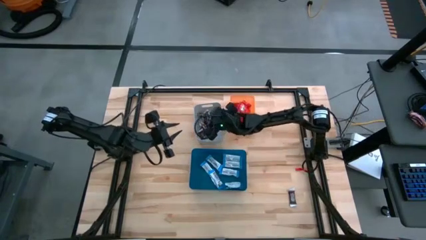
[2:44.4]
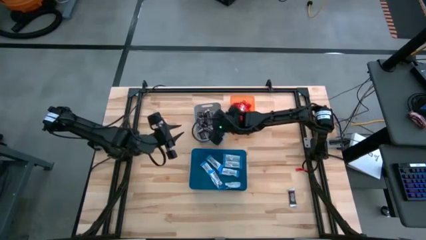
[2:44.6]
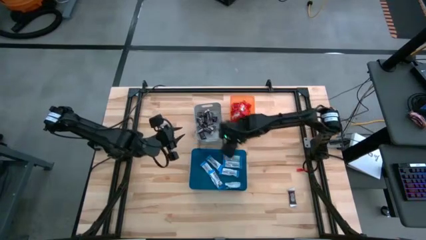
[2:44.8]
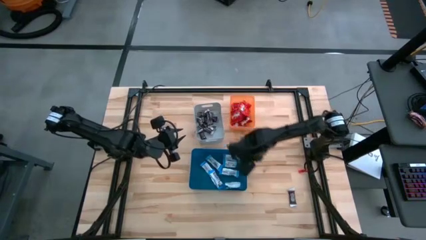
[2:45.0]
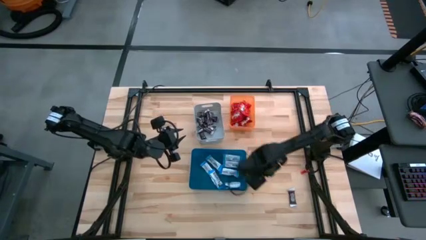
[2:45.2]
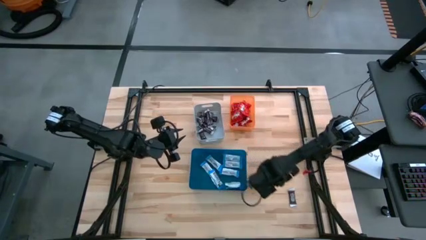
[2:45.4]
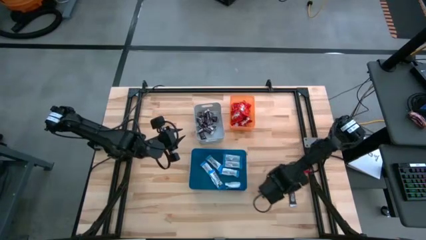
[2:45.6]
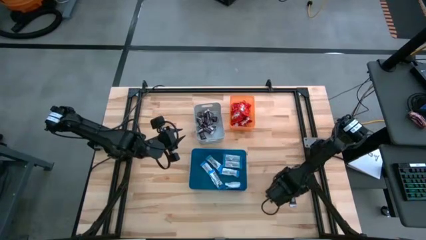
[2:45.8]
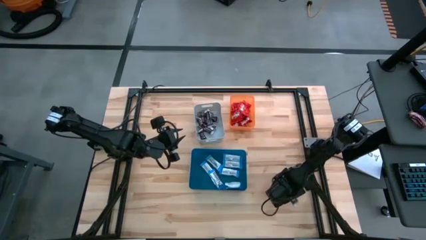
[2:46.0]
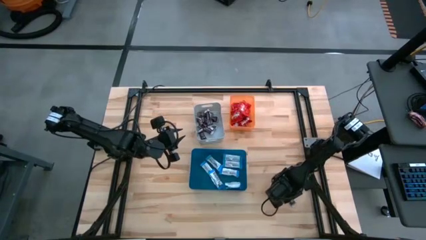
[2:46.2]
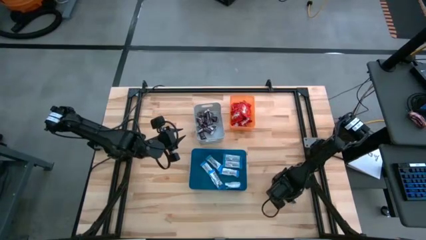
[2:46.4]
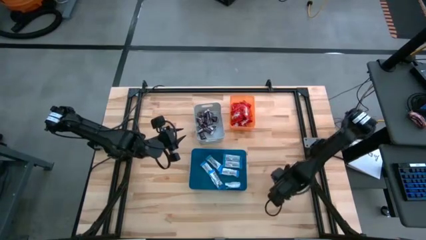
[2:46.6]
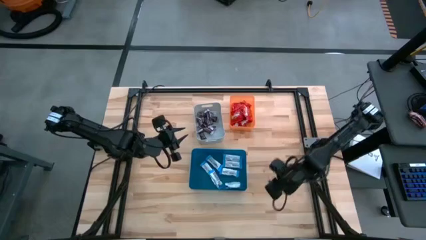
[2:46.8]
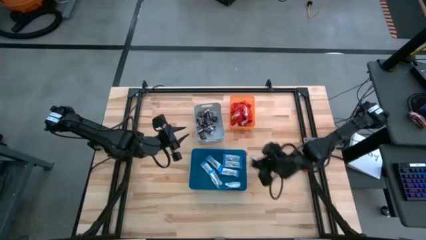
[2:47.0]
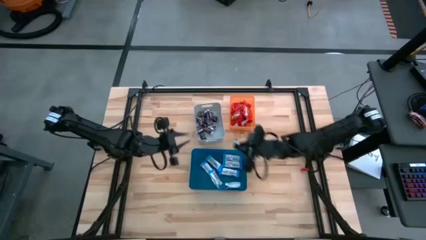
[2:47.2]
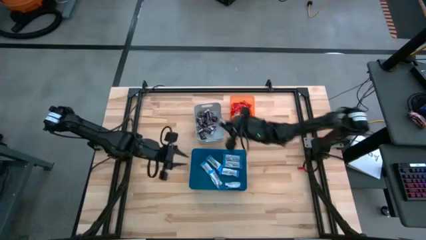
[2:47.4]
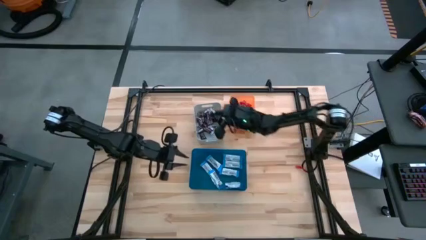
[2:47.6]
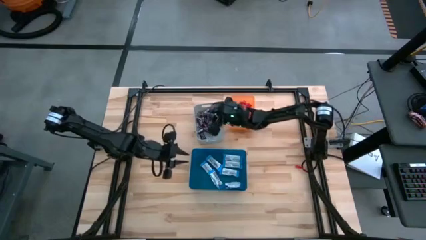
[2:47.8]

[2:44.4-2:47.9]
Task: Sort candy
Put the brown chocolate bar into the gray bin

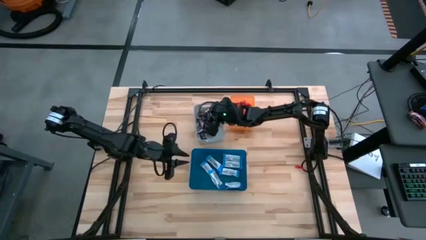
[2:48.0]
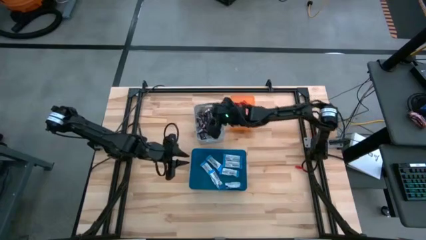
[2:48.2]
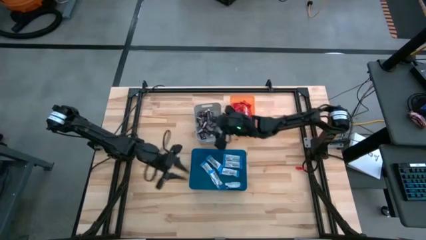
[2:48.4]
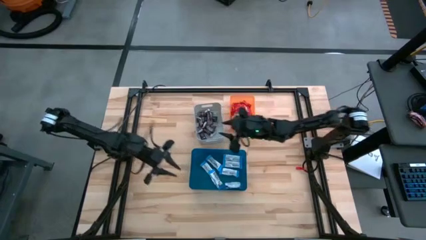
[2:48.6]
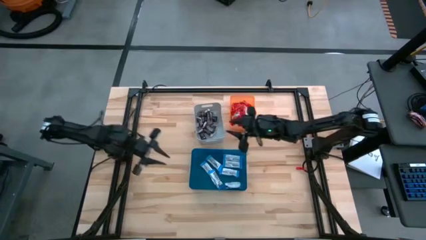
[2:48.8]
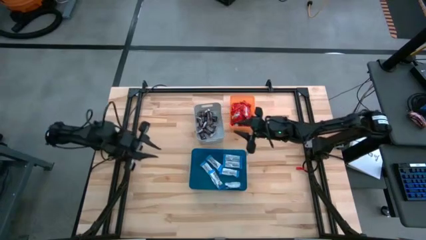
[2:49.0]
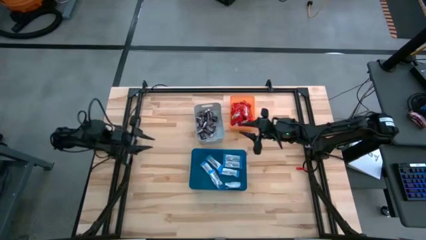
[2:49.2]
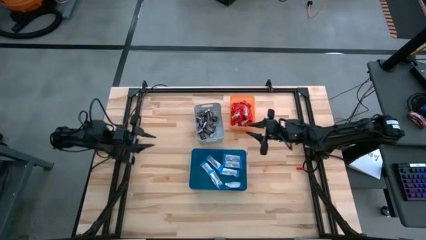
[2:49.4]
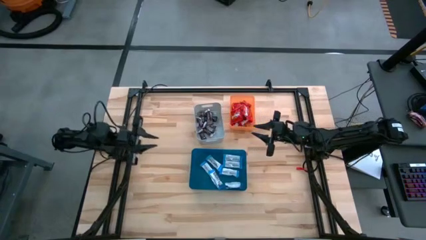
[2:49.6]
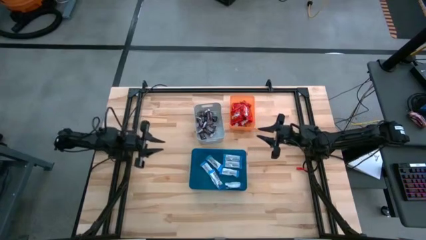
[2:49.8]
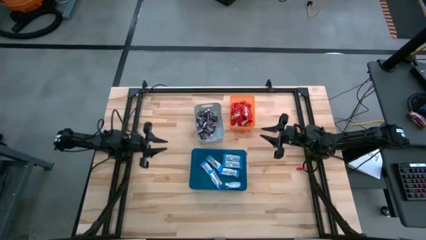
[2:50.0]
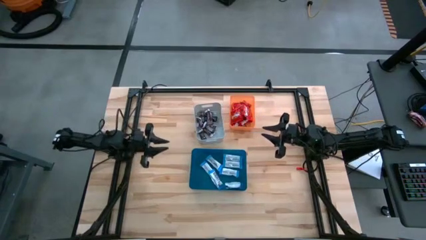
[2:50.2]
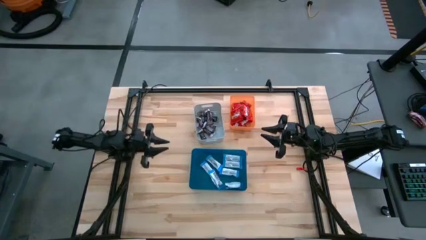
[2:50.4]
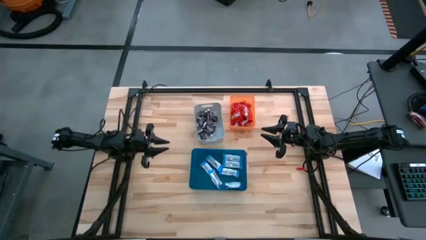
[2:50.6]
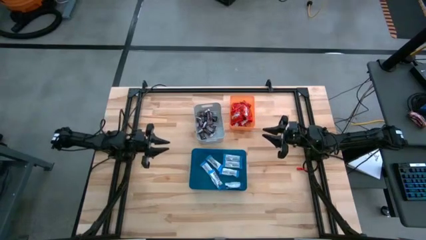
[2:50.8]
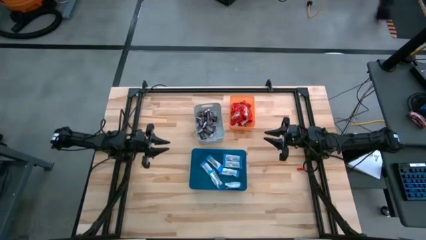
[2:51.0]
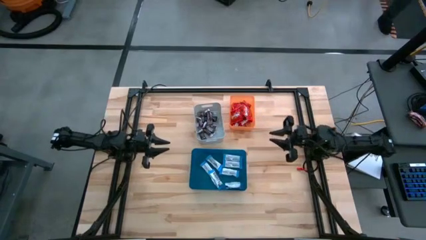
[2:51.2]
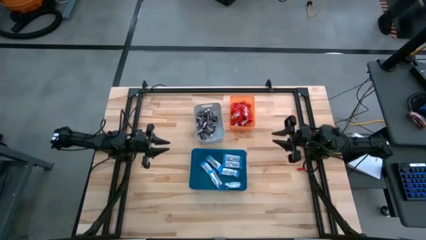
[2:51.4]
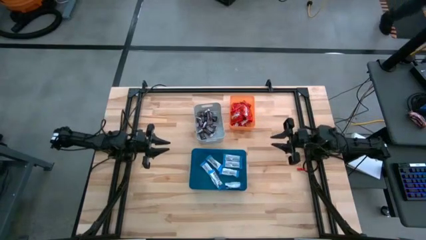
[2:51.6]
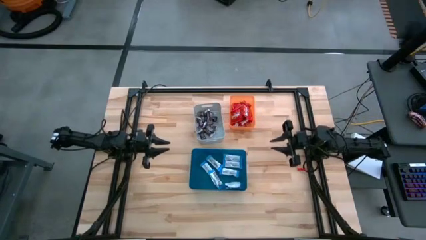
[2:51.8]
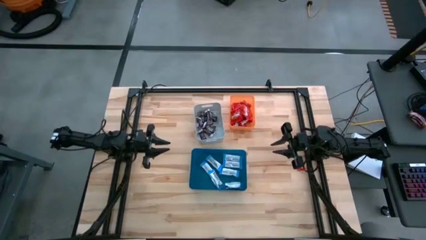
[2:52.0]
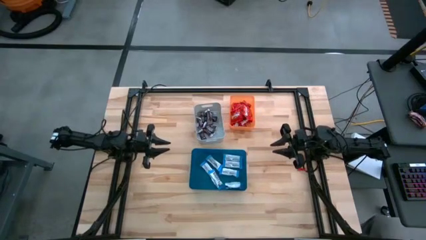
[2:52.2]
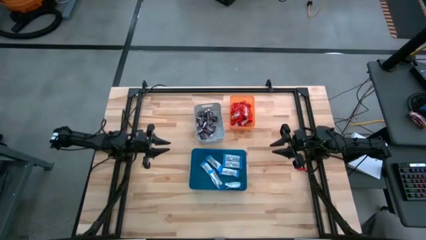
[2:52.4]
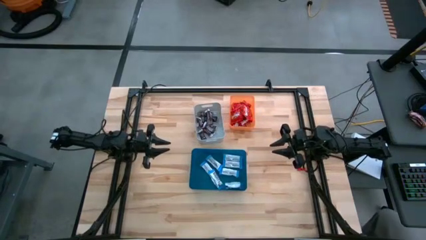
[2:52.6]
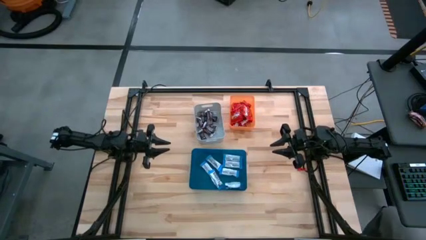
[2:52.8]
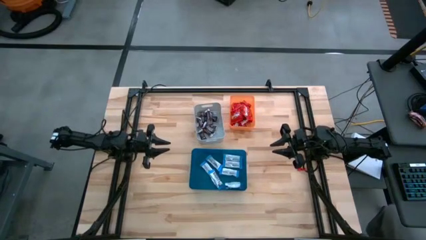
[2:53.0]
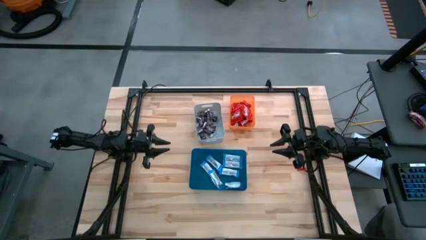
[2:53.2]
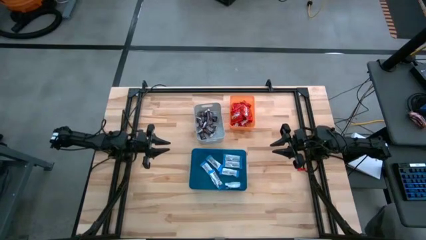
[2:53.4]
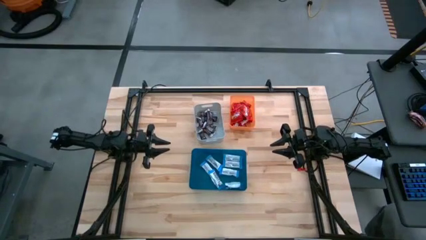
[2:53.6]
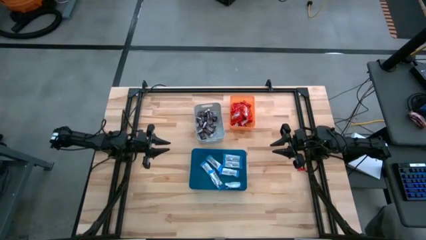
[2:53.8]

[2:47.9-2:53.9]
Return to Home Position

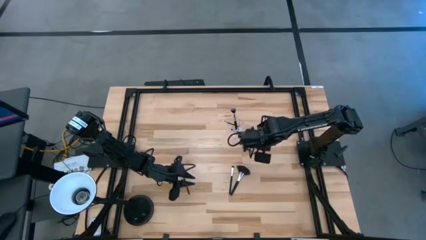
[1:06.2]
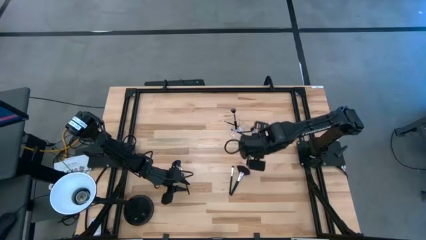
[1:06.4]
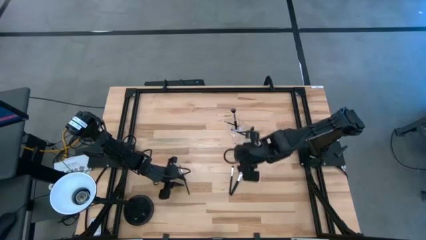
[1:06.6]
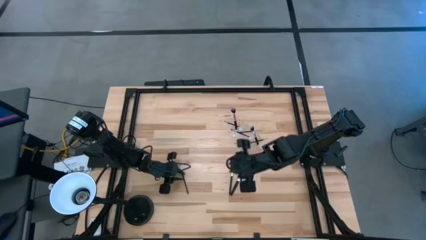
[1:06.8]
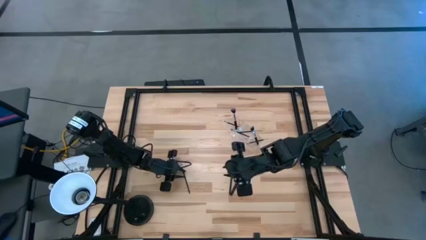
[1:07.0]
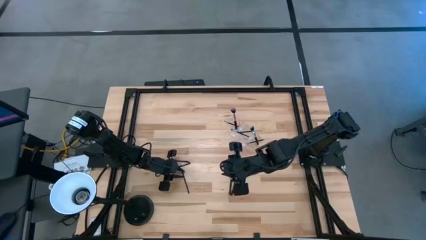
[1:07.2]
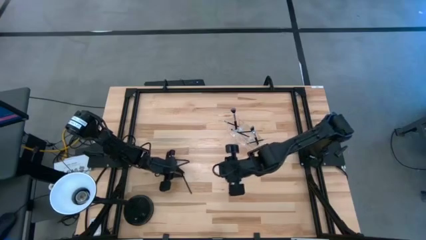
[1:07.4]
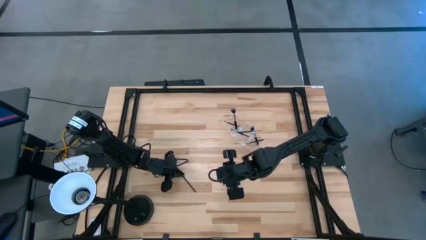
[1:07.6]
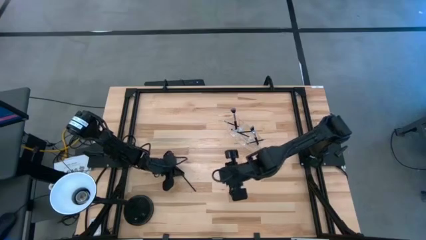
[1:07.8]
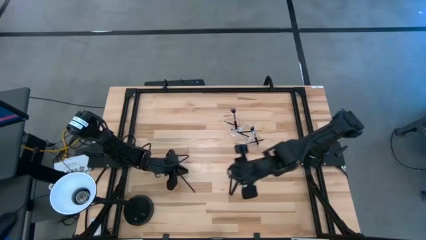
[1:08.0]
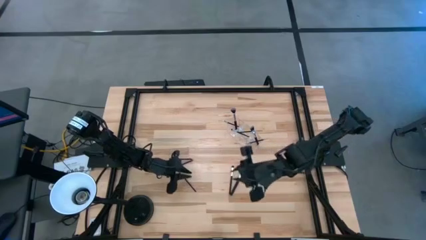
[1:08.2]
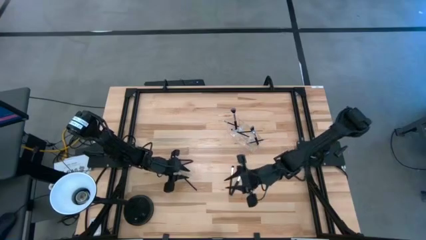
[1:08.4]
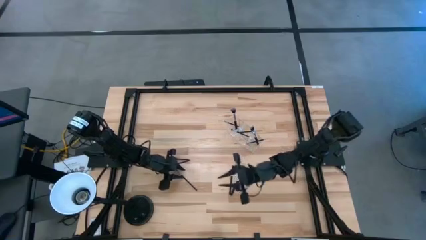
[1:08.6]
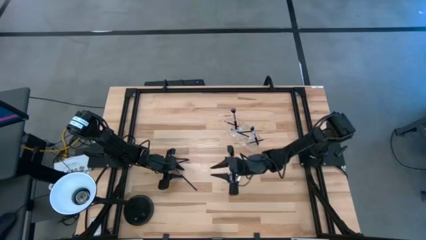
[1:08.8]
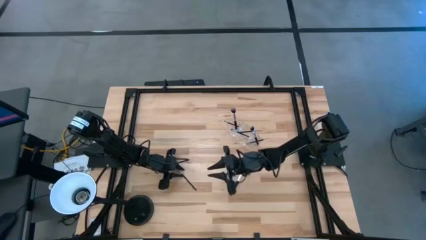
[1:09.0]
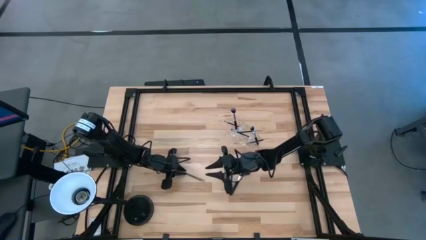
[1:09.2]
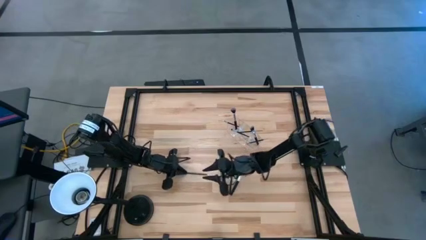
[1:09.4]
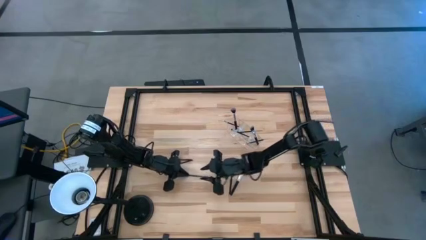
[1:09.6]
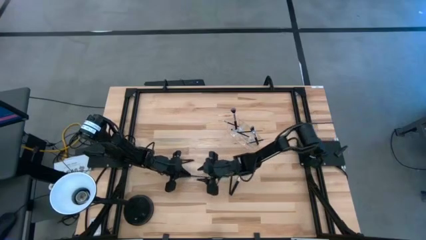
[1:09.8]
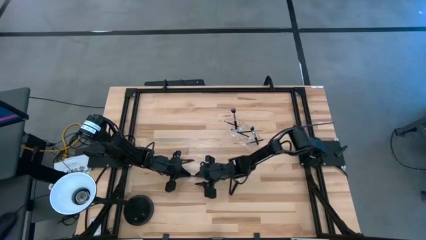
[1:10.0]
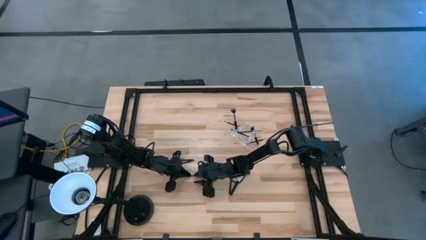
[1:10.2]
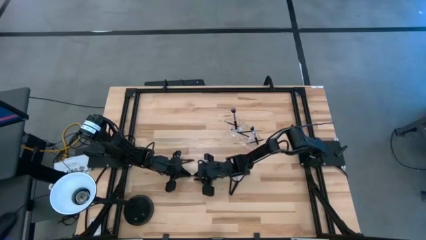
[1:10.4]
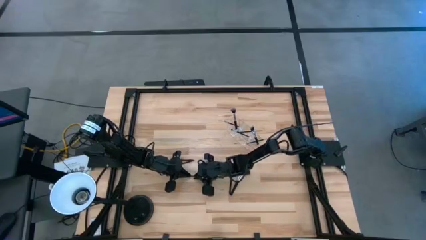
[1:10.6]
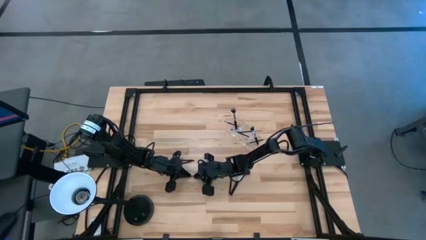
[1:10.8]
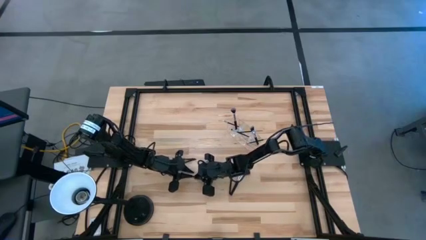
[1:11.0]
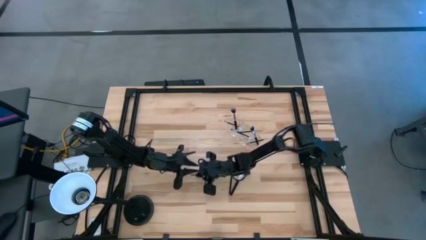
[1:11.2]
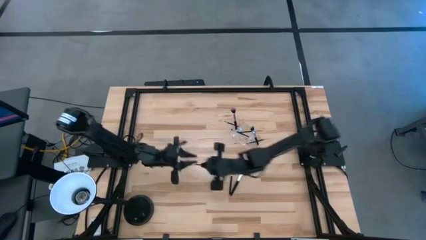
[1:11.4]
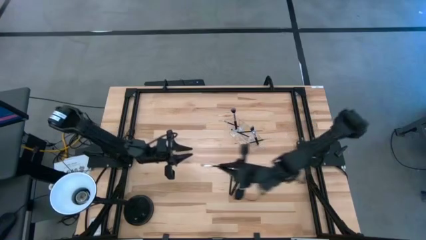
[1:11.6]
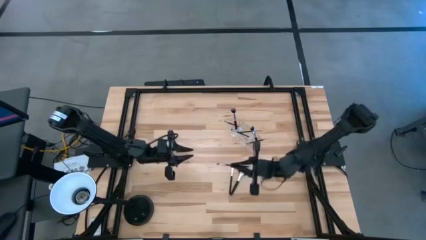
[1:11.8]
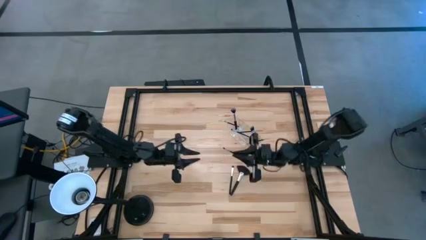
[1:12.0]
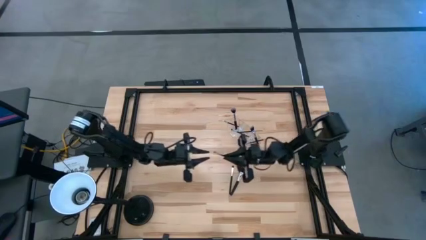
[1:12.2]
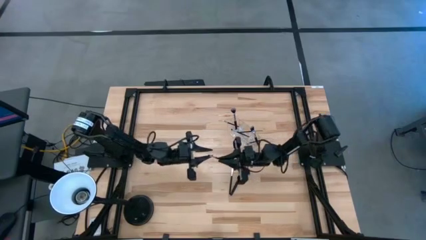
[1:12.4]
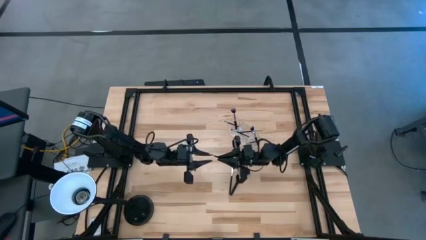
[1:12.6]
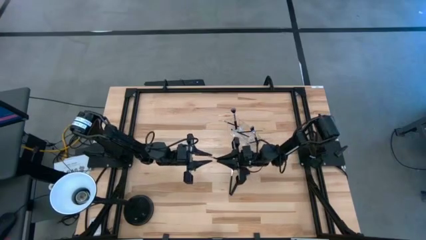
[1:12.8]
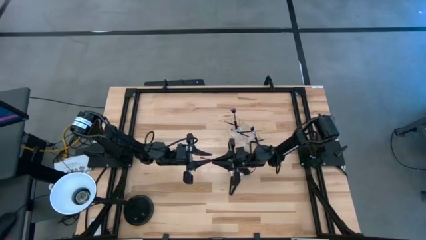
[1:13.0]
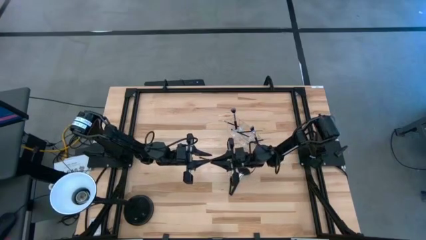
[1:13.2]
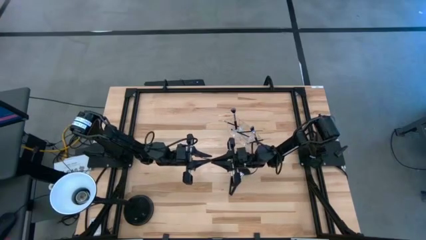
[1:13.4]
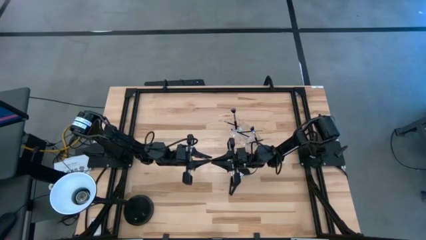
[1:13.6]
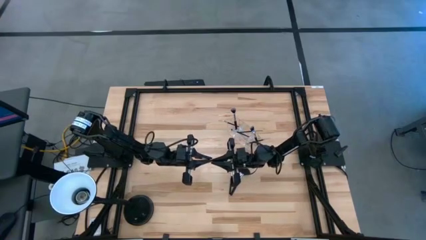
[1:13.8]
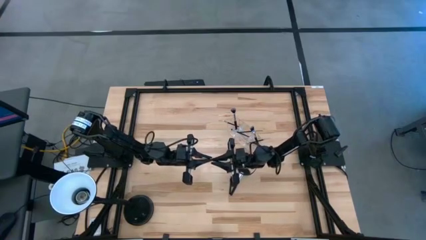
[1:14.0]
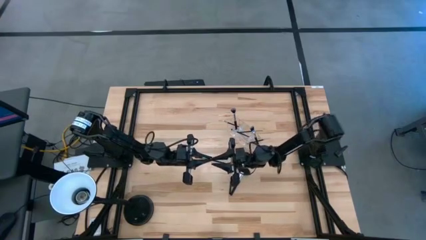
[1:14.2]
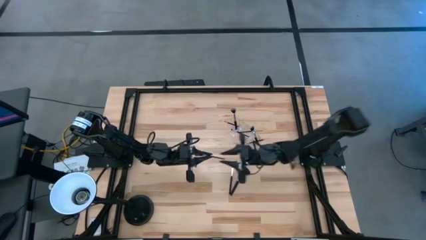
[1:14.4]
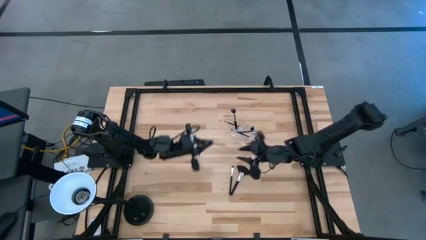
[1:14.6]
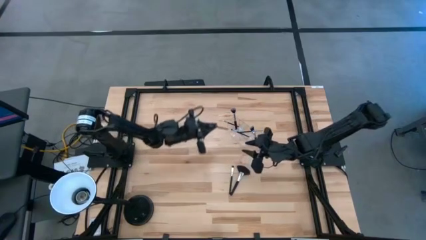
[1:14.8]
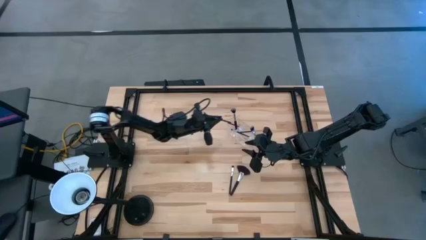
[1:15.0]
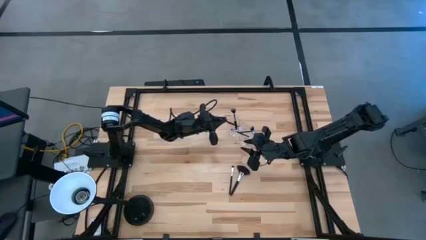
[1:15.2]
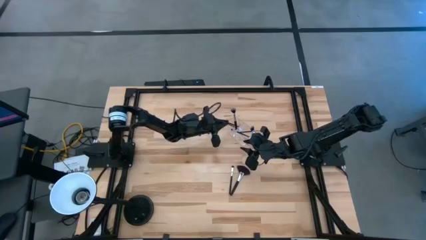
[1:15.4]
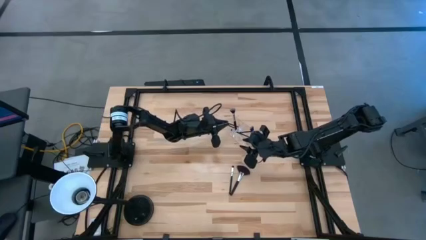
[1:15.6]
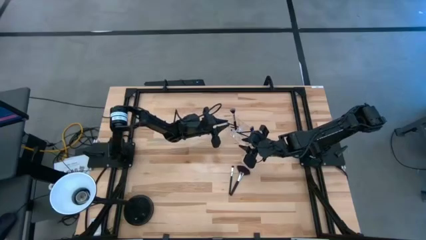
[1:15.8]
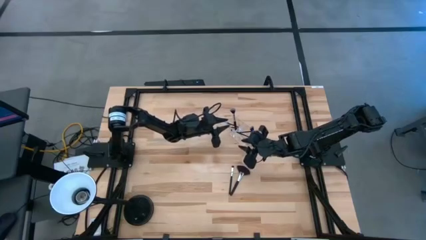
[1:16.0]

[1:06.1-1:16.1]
Task: Put items in baskets/containers
Put the eyeshadow brush into the transparent organizer
